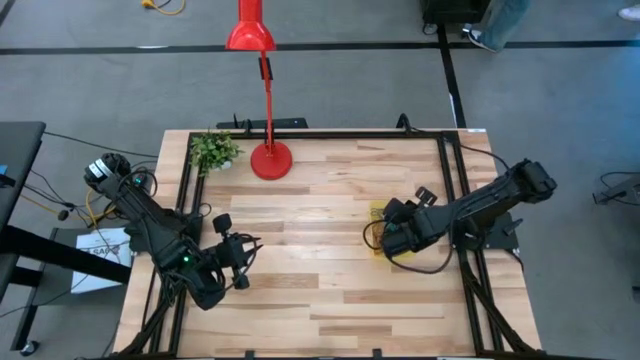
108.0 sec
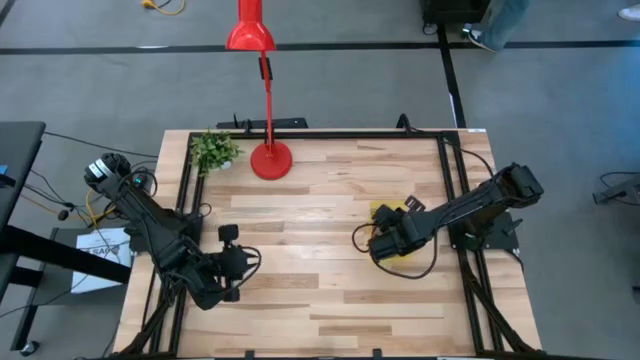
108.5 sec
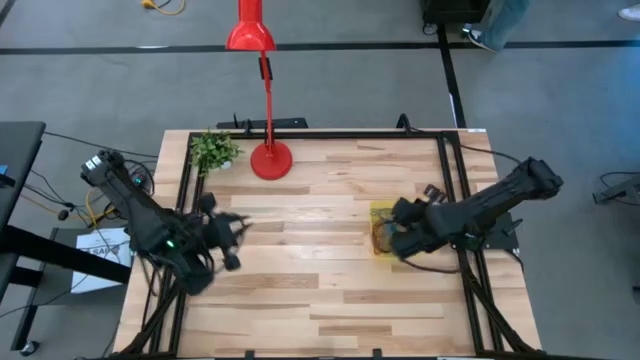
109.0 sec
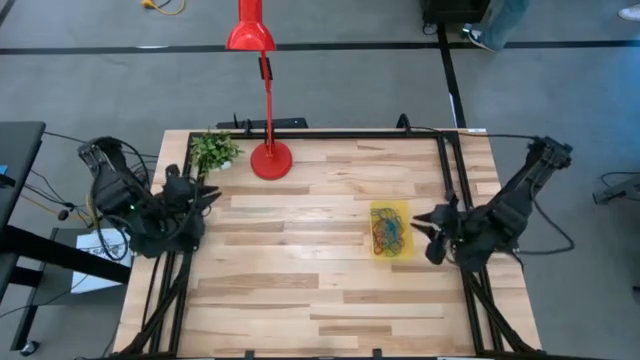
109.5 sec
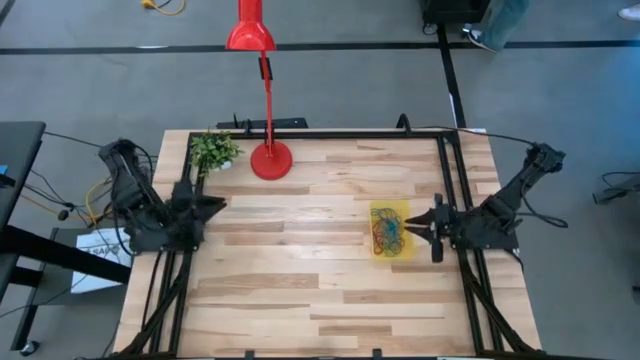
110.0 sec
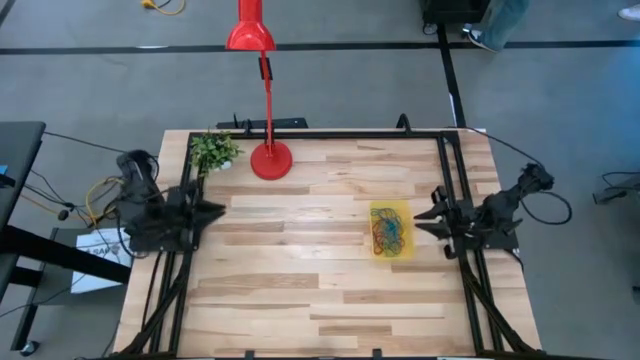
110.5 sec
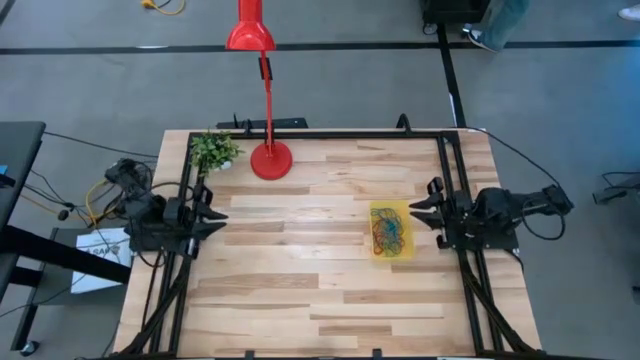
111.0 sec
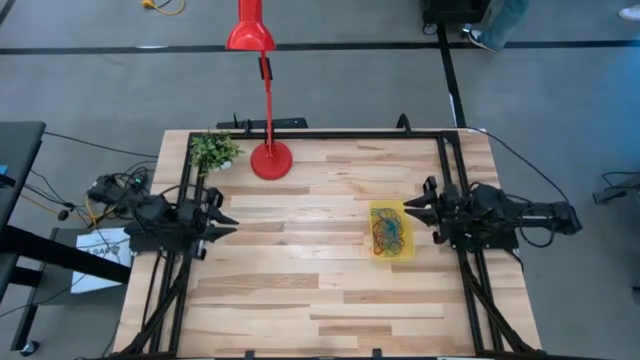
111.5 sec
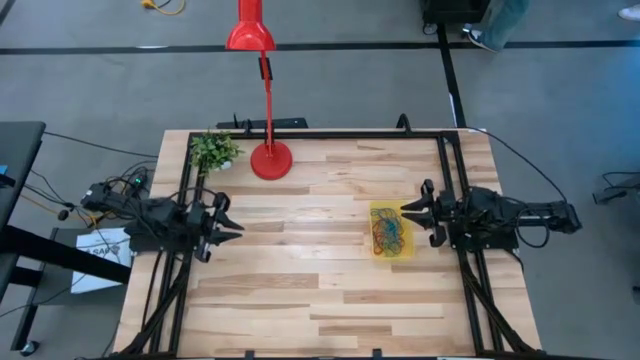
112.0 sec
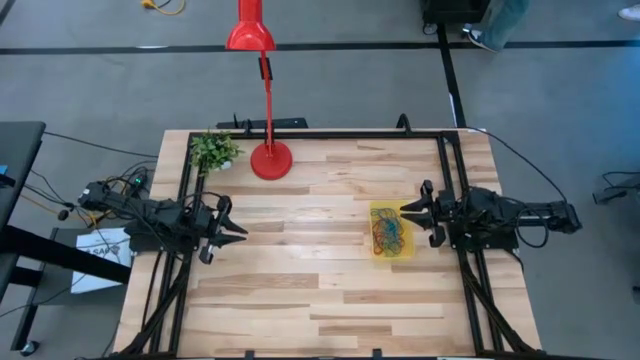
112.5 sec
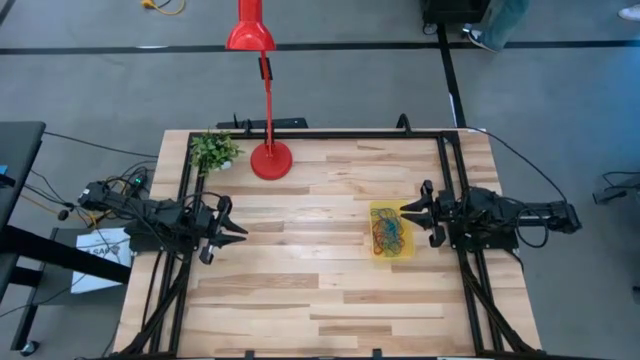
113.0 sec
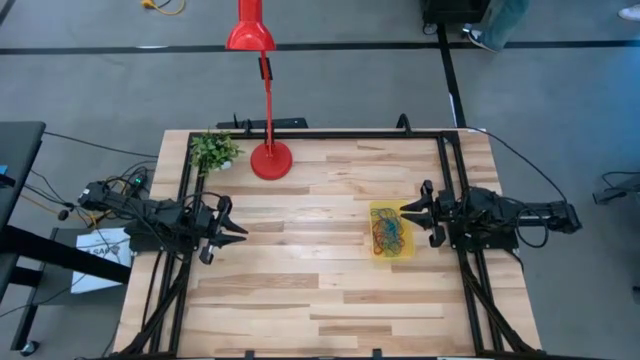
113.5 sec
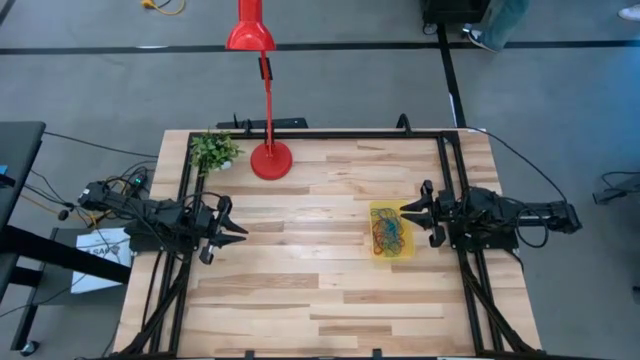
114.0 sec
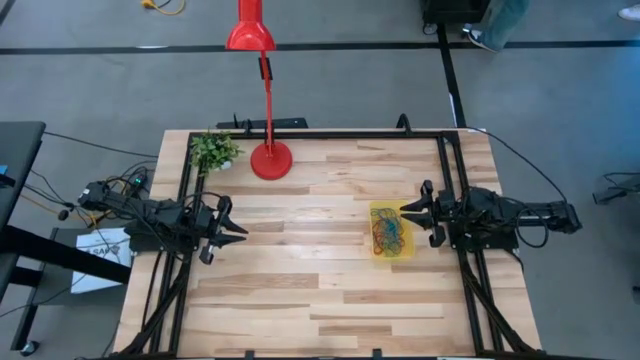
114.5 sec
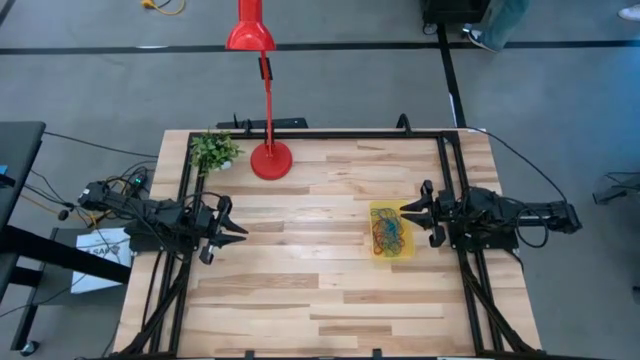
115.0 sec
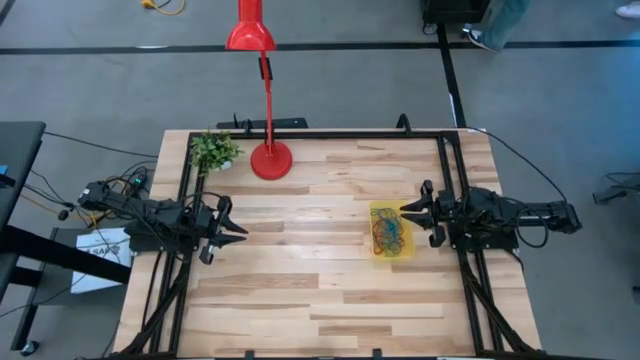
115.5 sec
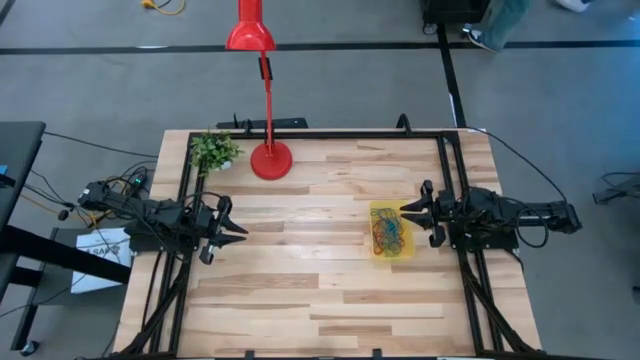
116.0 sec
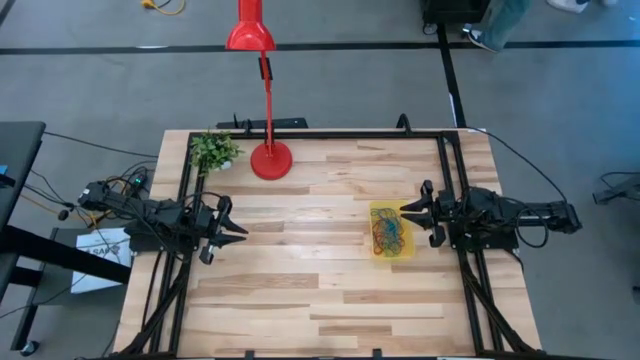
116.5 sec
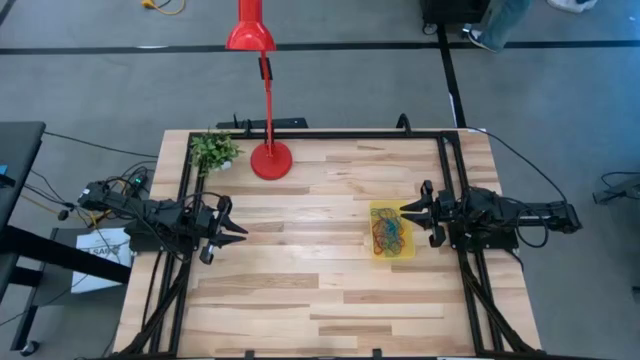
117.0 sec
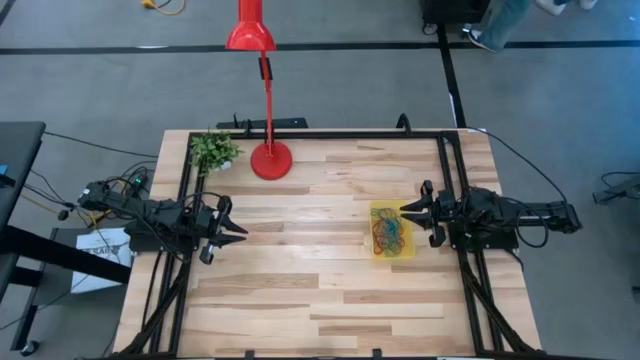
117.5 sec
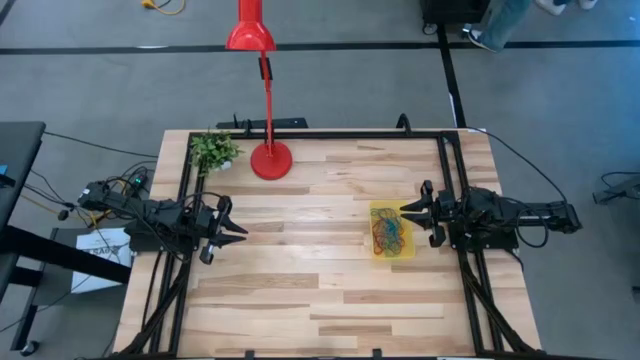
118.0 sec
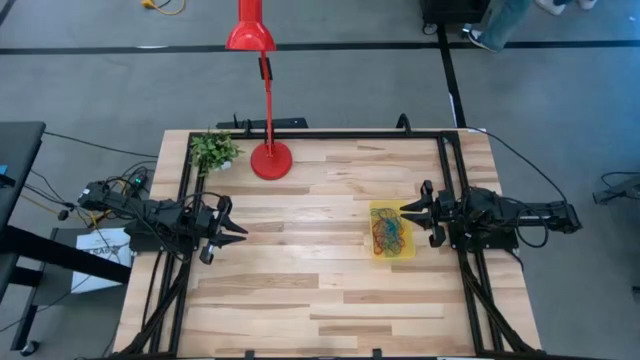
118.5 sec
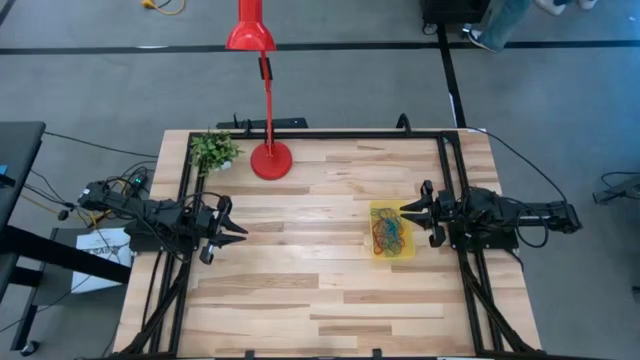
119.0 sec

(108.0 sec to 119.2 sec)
Task: Pick and place items into bin
Return to Home Position

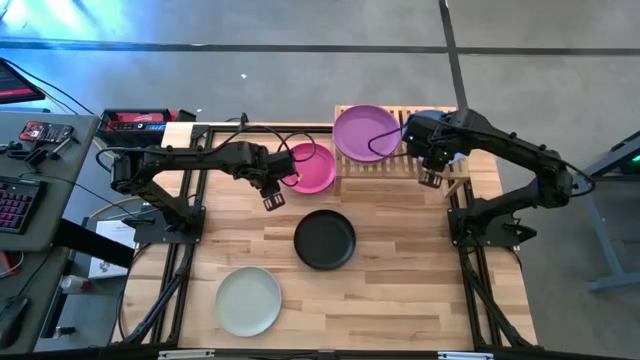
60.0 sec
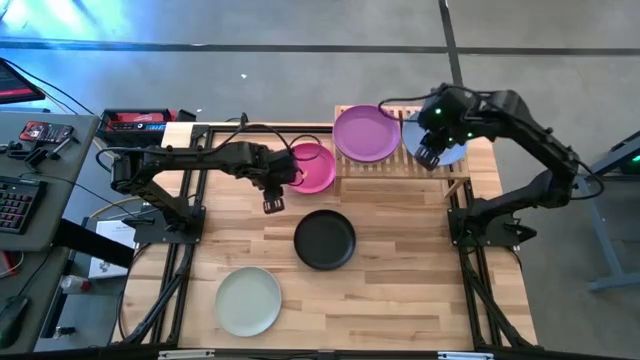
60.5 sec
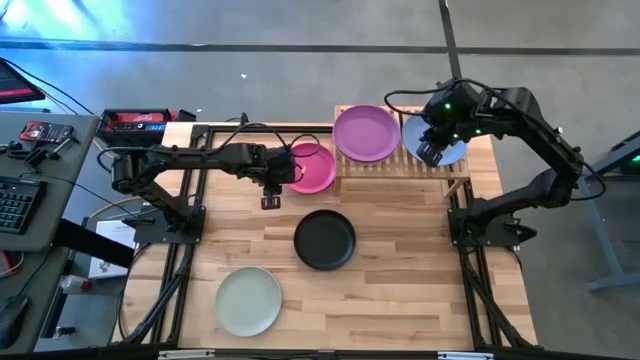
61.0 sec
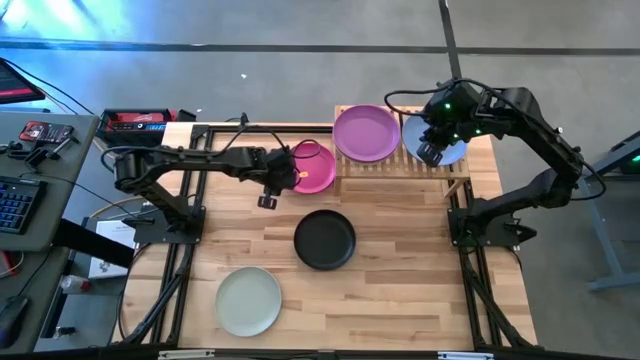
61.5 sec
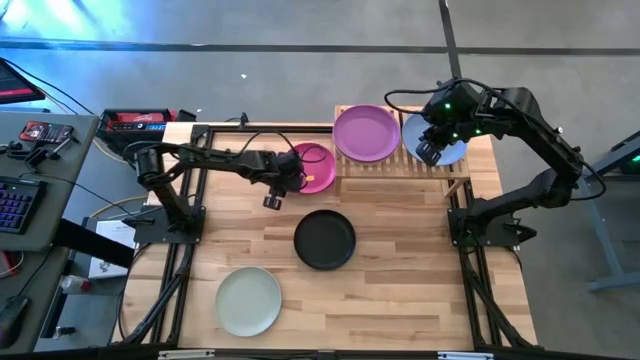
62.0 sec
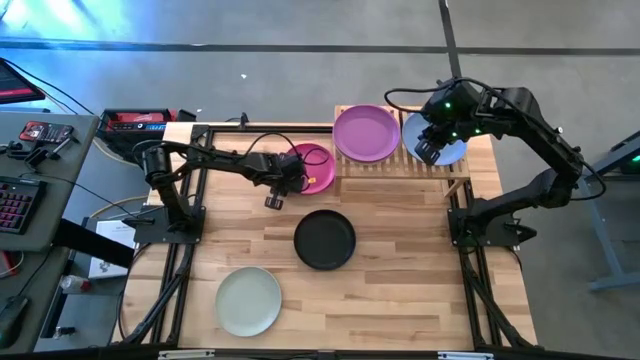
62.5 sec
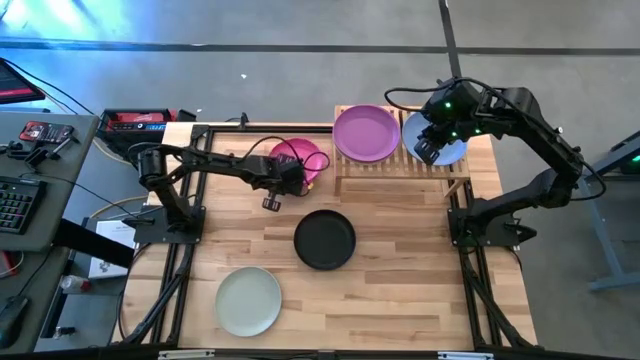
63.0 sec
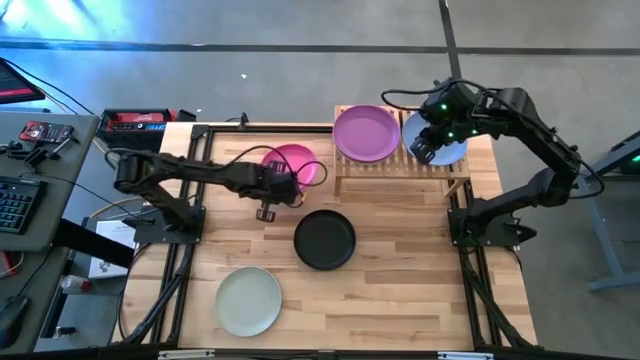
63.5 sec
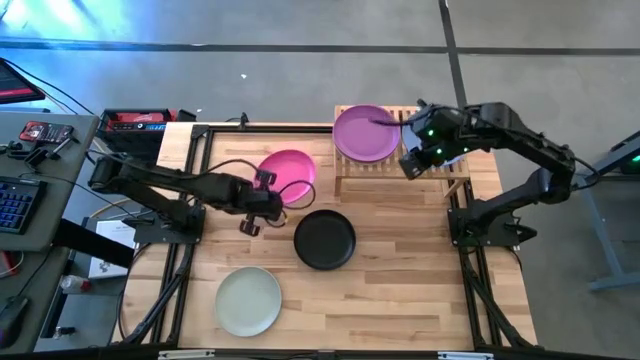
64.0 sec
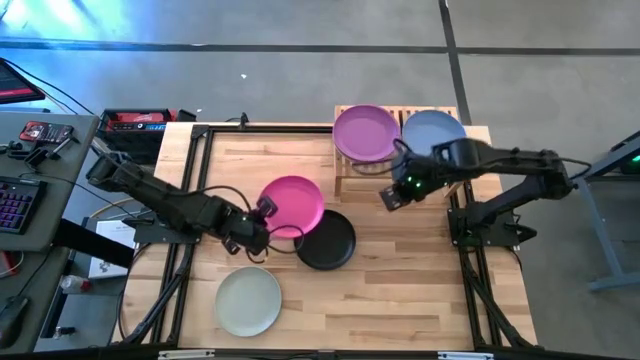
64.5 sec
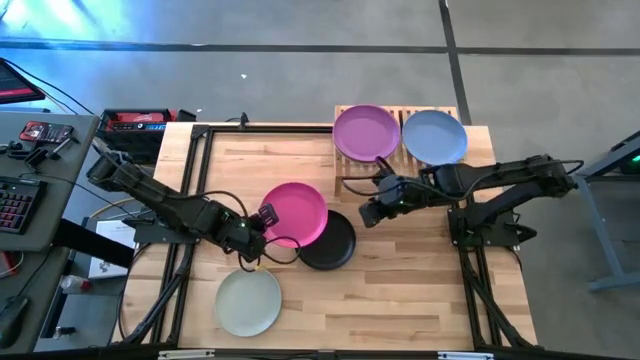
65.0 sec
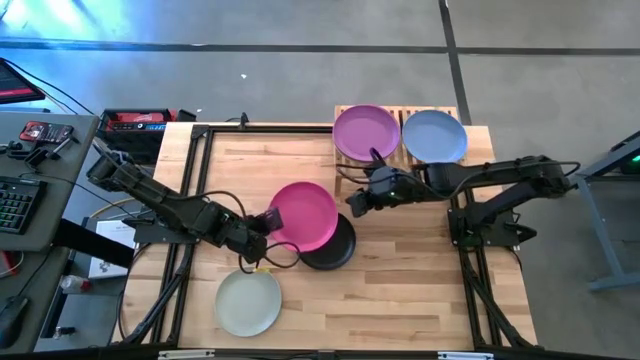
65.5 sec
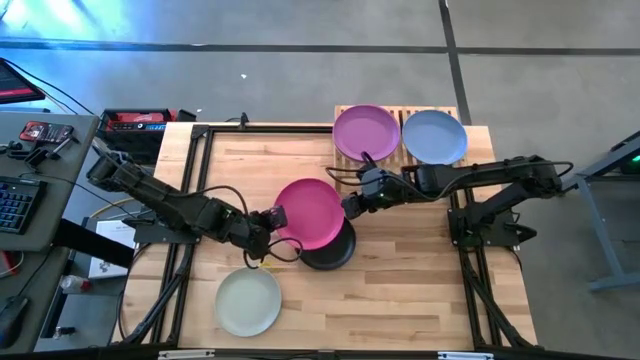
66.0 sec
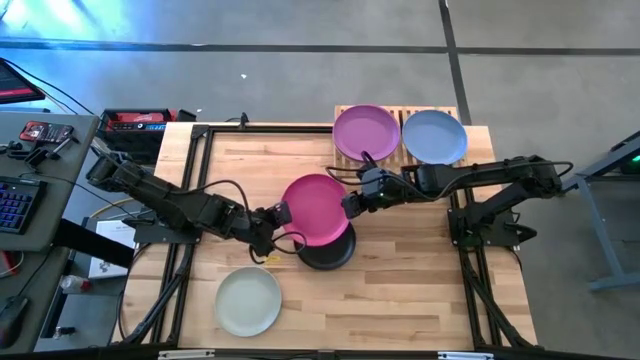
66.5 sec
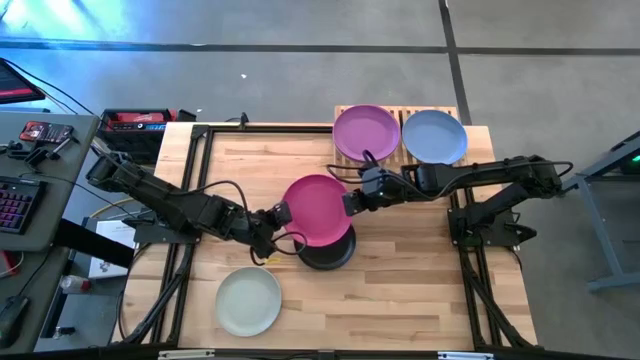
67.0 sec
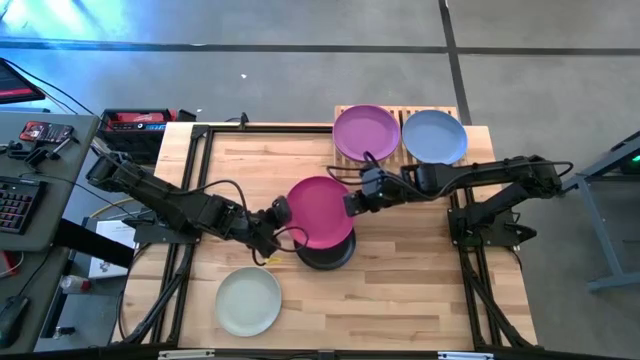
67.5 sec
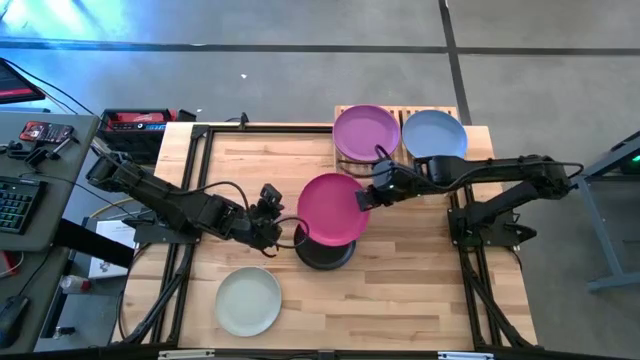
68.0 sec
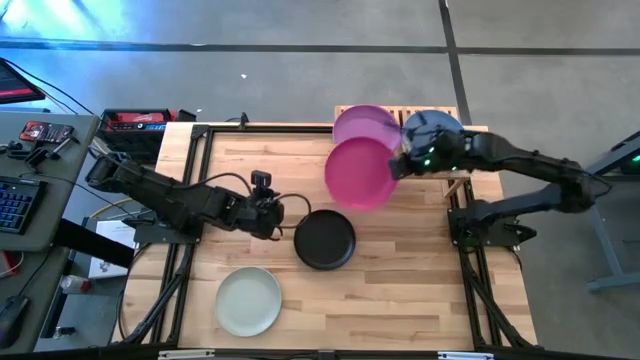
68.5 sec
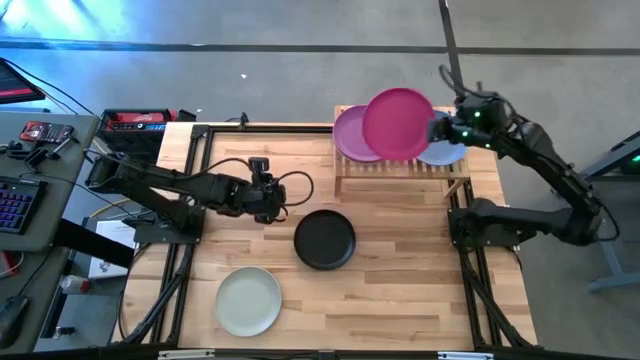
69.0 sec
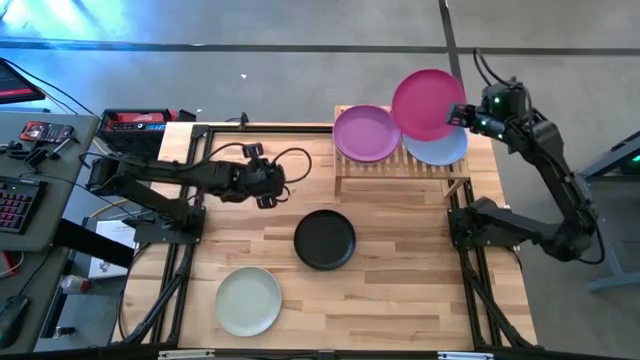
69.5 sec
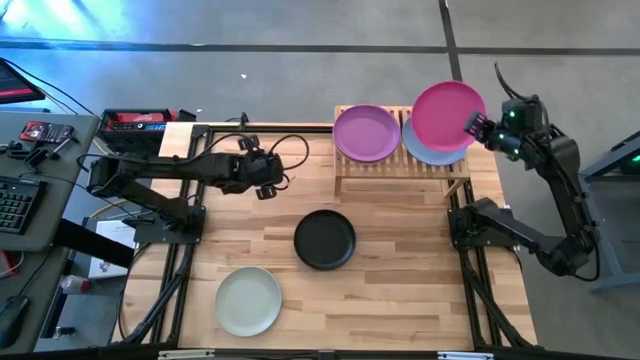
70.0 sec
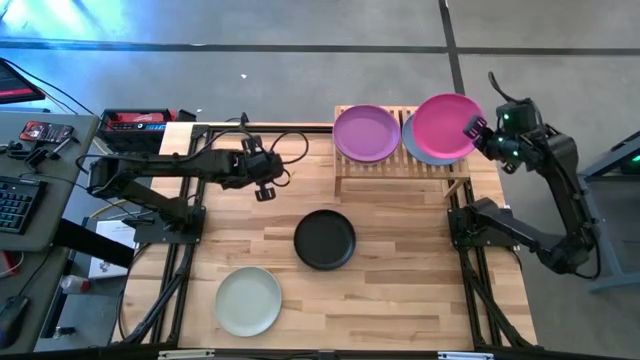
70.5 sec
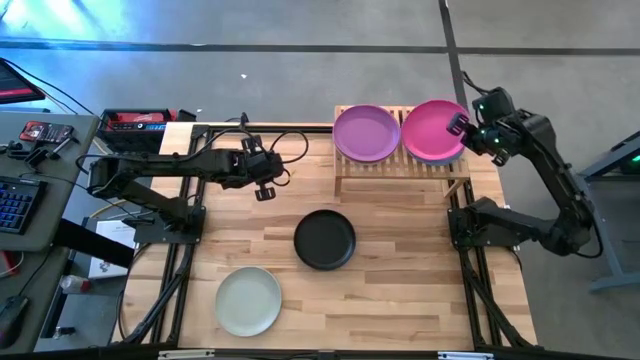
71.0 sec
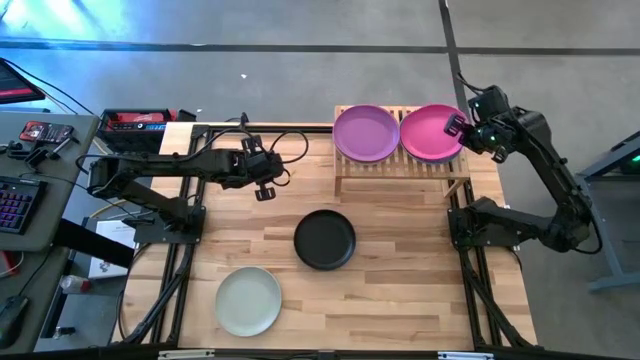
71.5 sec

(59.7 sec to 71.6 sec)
Task: Place and stack plates onto a shelf
Stack the top pink plate on the blue plate
